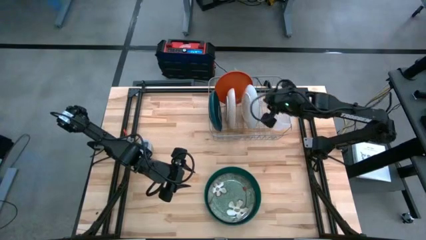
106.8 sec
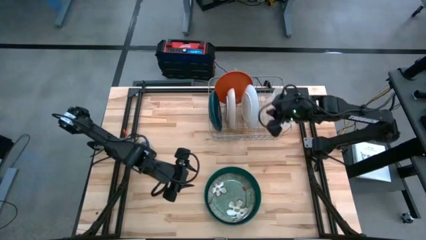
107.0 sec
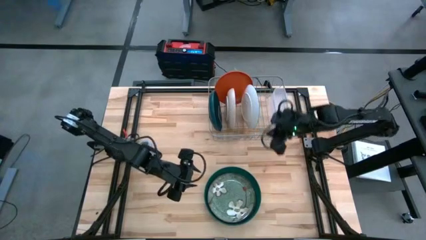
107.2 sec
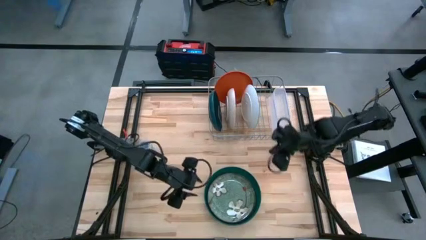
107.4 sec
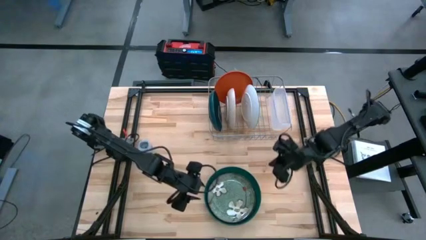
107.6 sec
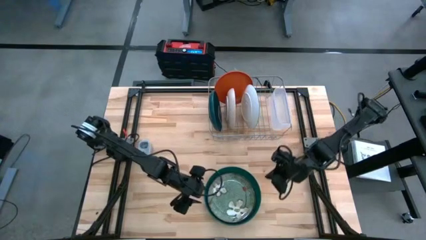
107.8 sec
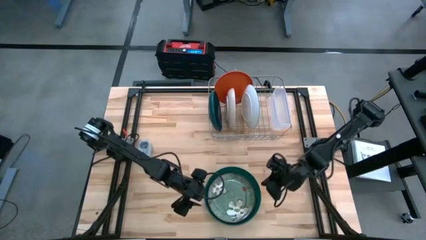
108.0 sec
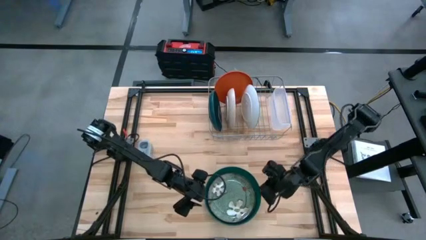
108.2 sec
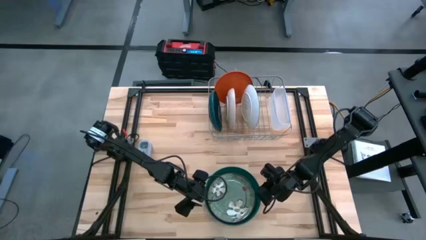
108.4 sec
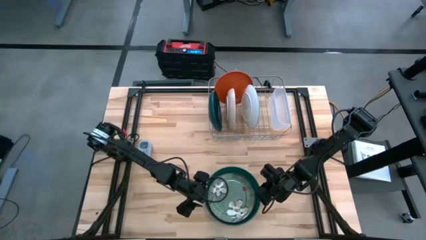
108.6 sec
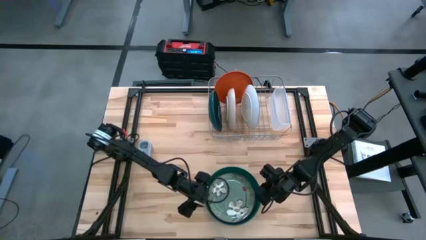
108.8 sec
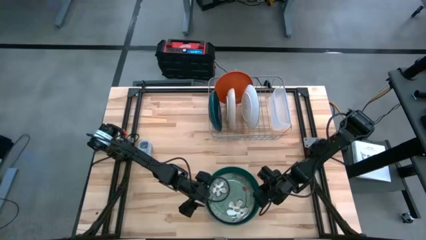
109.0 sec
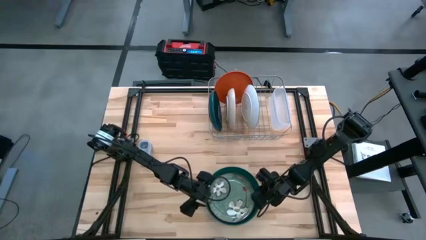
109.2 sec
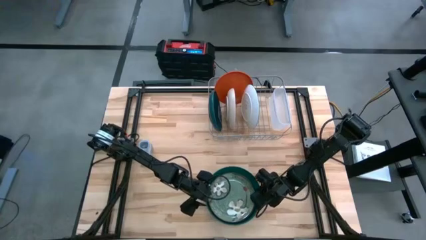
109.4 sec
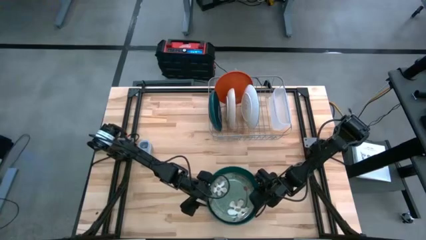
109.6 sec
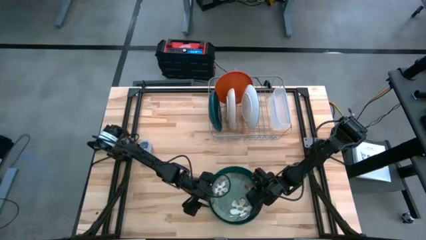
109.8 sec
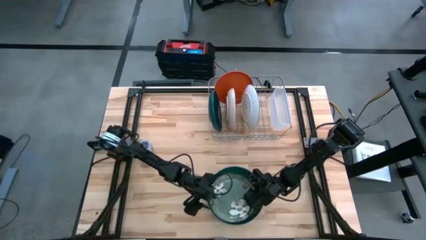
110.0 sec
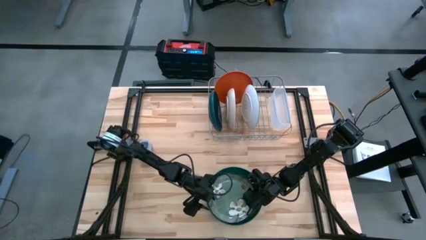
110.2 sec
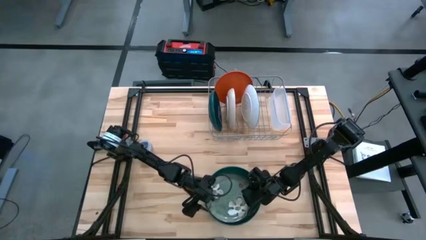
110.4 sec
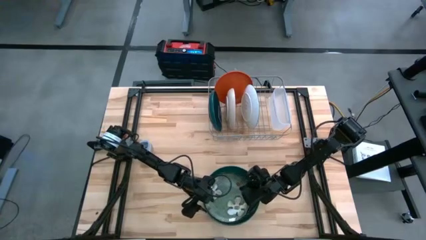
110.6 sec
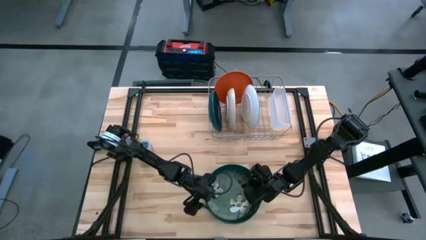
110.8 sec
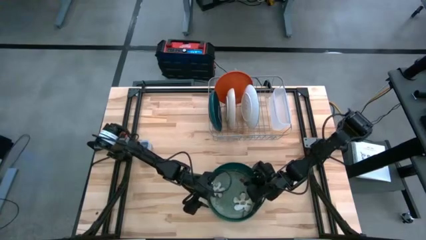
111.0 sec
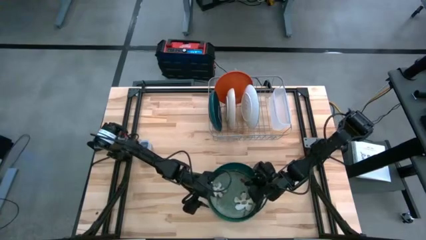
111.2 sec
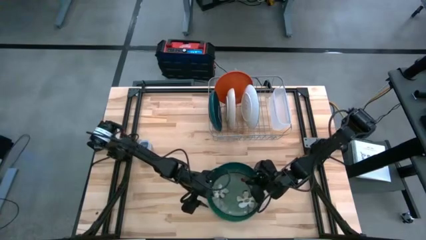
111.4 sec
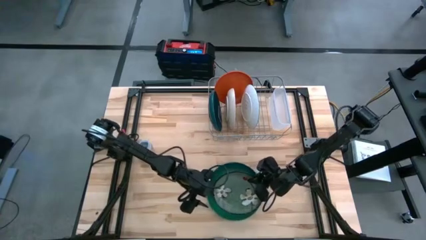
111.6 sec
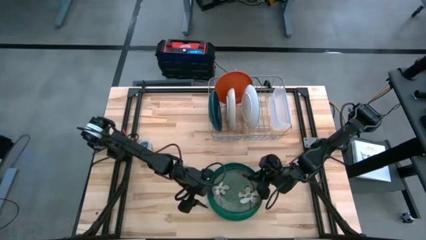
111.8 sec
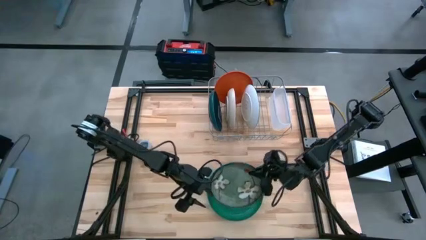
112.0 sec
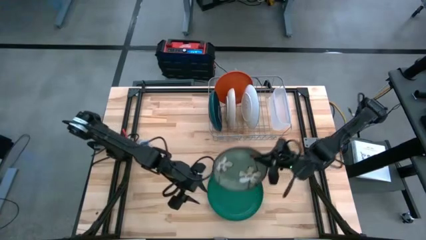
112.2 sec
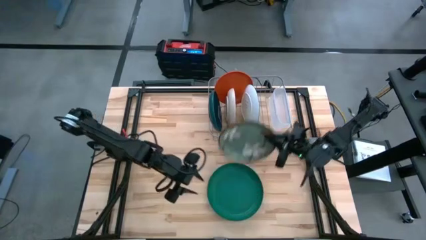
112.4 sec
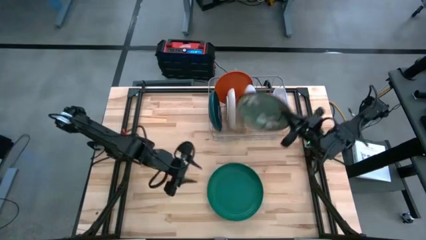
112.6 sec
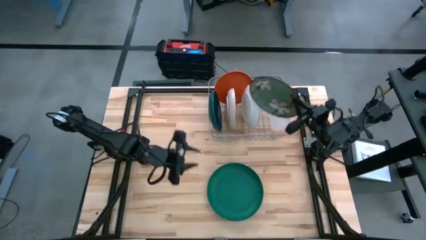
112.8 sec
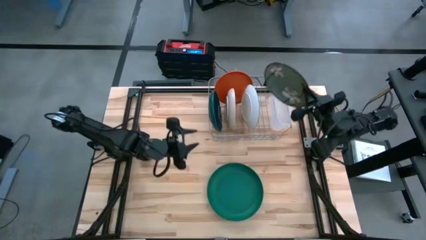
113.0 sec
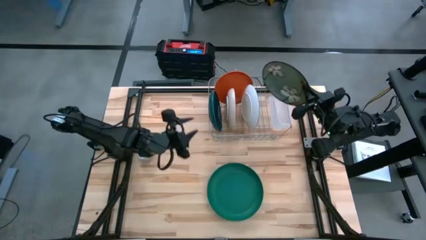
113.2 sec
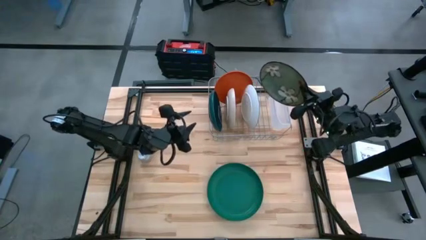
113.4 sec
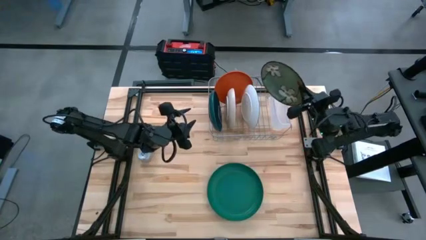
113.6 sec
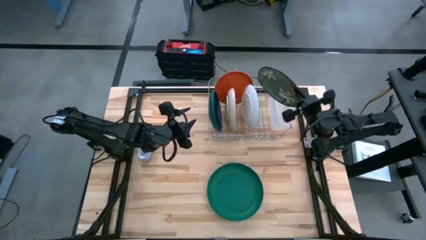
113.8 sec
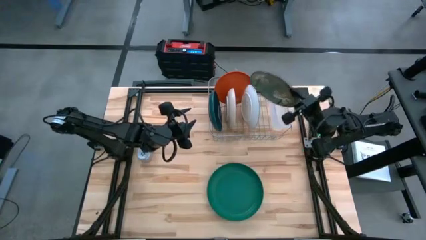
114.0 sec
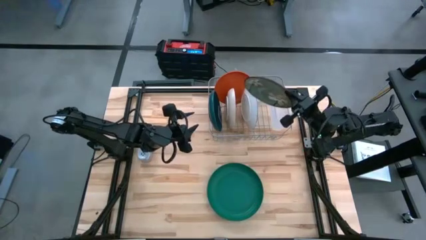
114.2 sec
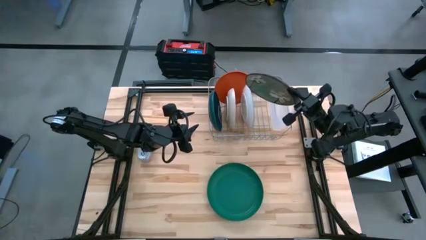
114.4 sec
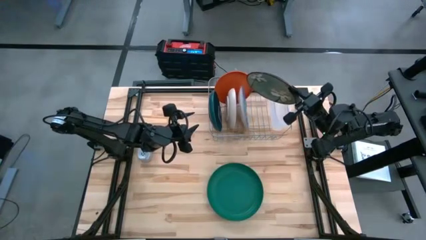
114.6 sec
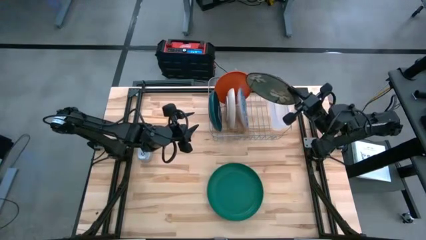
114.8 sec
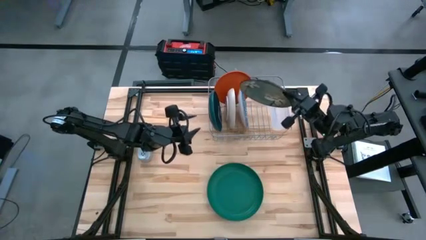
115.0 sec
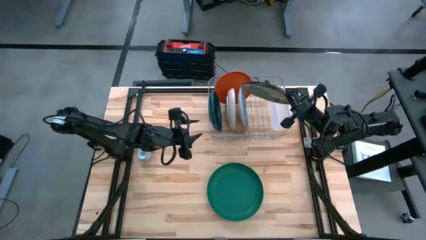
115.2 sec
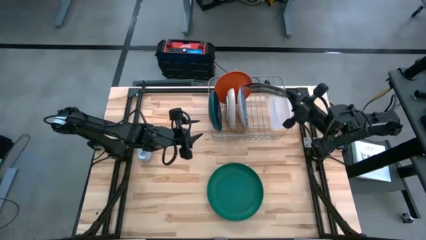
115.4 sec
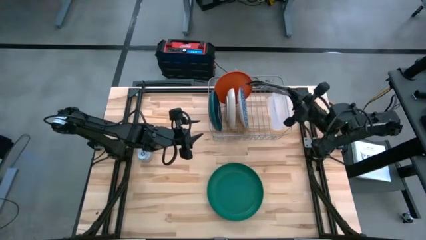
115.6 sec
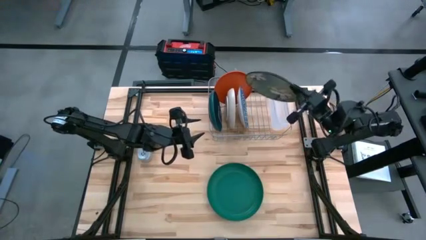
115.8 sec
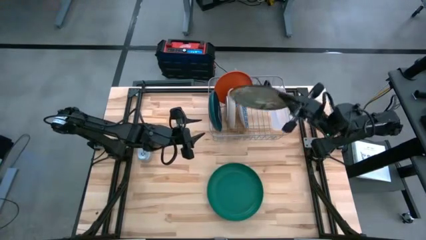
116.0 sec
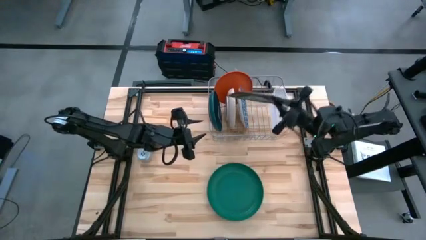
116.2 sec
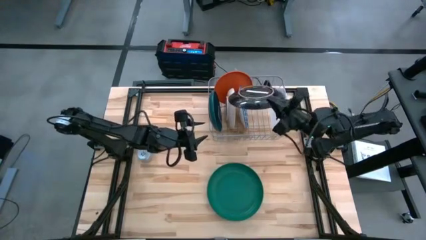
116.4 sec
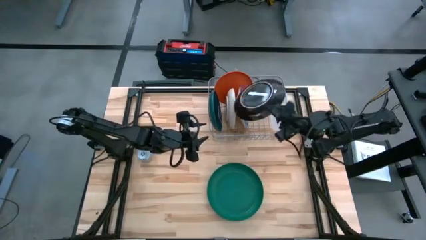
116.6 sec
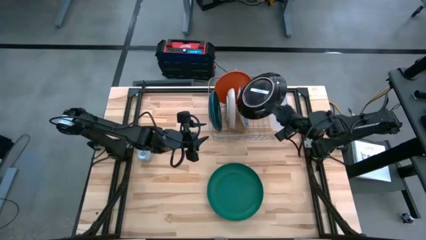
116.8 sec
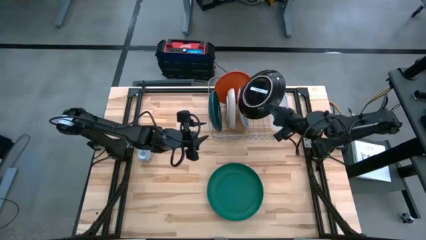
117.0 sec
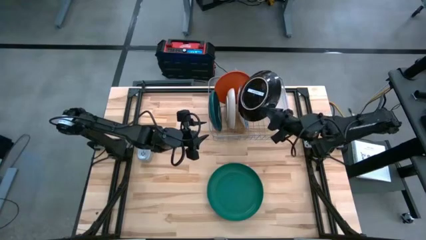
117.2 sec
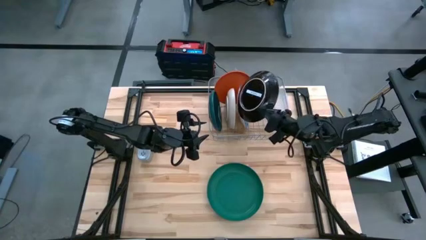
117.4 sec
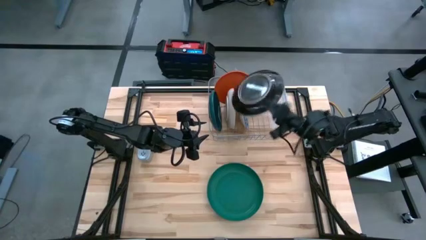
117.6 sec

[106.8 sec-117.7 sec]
Task: Sort dishes
Put the green patterned plate in the dish rack

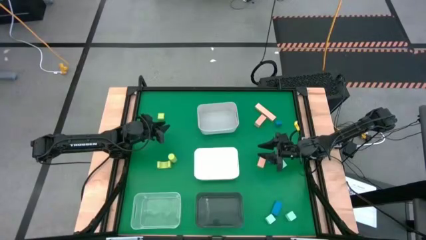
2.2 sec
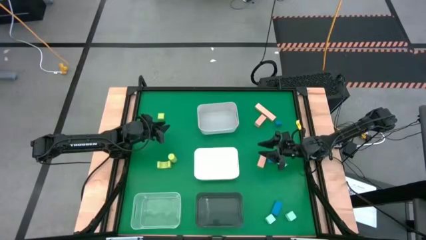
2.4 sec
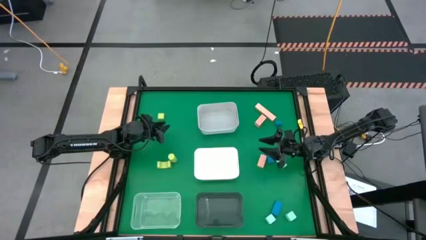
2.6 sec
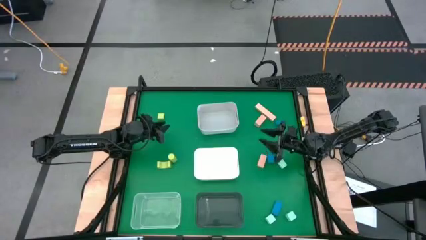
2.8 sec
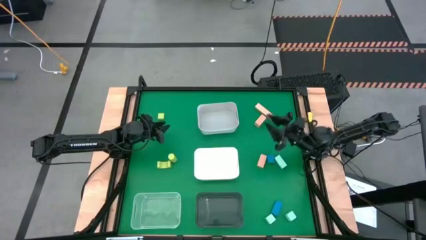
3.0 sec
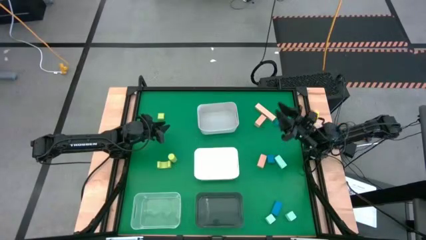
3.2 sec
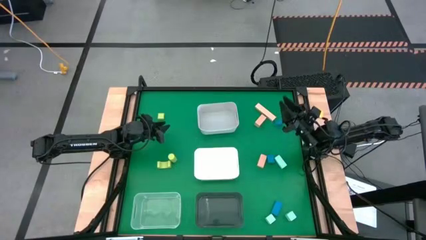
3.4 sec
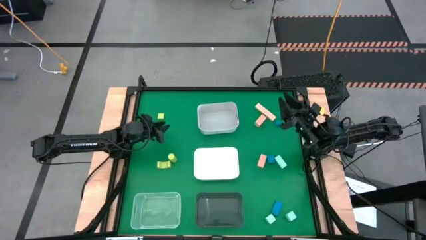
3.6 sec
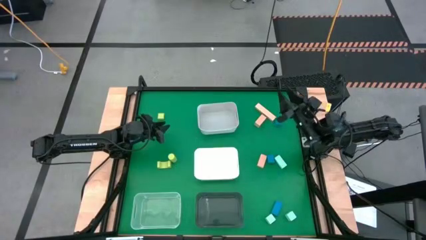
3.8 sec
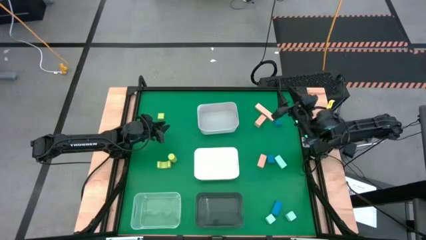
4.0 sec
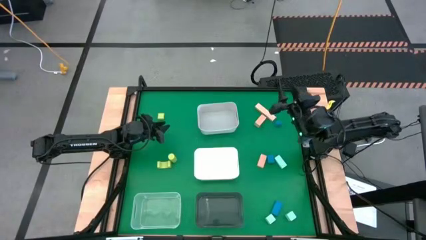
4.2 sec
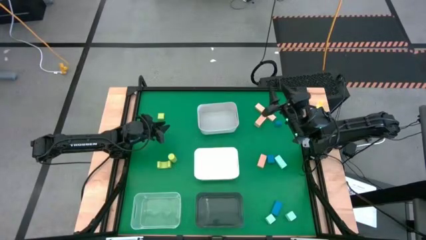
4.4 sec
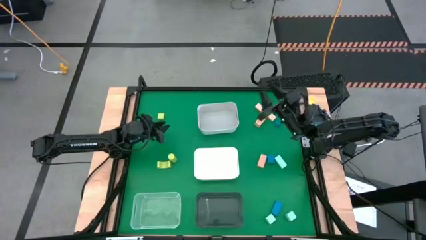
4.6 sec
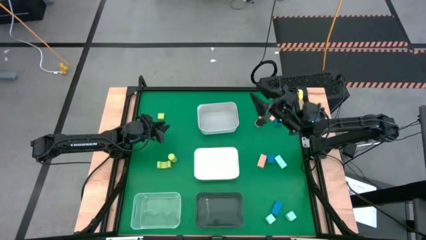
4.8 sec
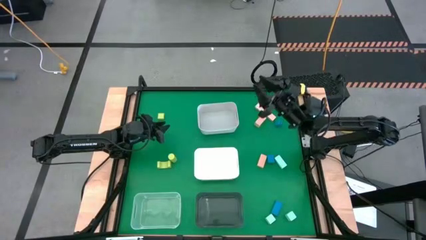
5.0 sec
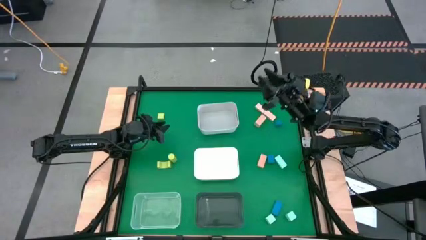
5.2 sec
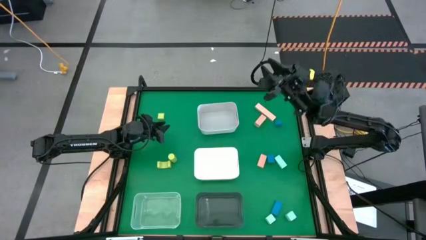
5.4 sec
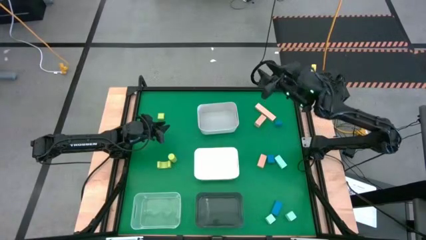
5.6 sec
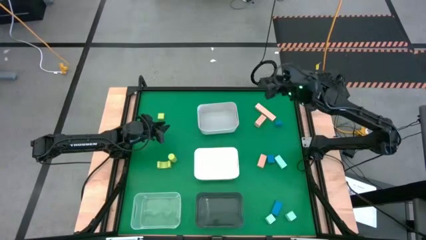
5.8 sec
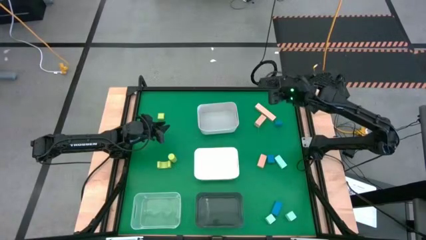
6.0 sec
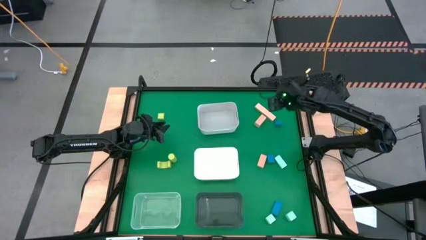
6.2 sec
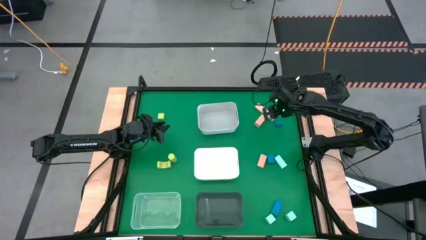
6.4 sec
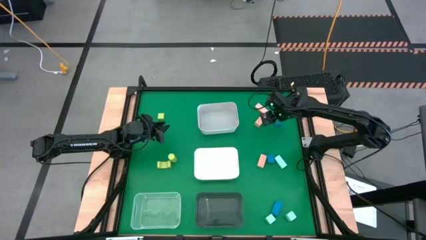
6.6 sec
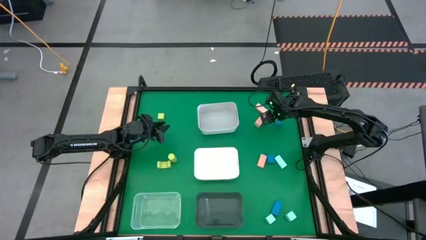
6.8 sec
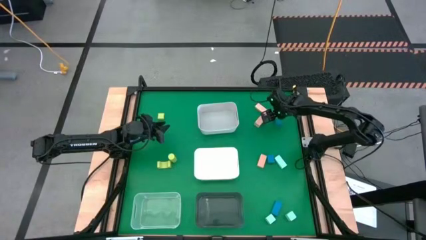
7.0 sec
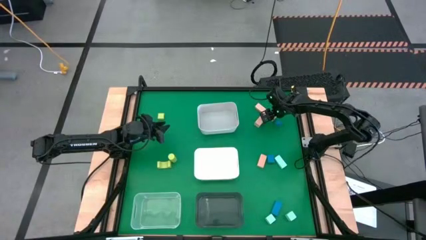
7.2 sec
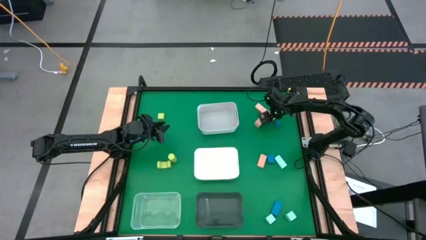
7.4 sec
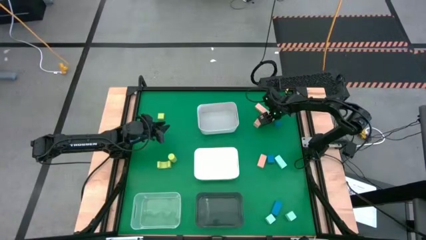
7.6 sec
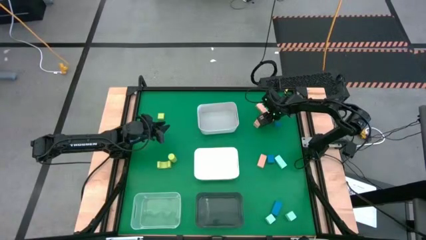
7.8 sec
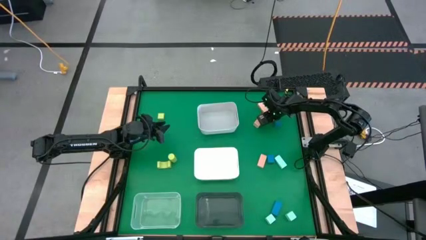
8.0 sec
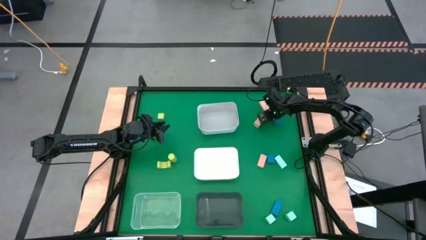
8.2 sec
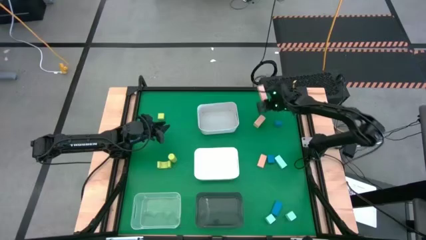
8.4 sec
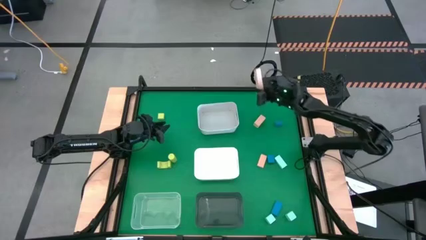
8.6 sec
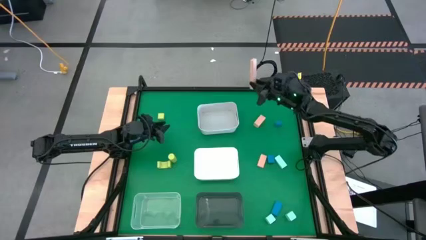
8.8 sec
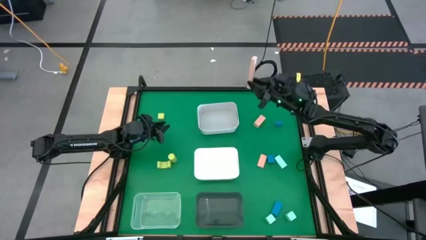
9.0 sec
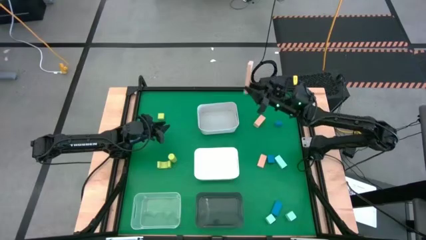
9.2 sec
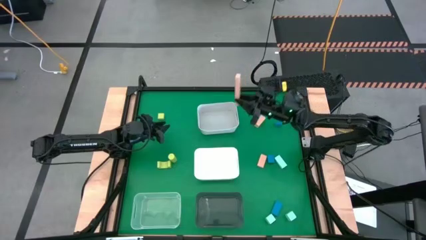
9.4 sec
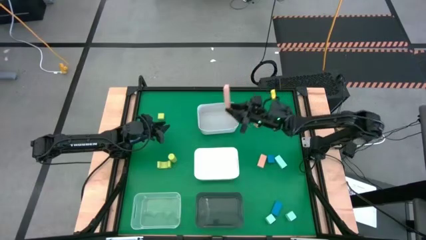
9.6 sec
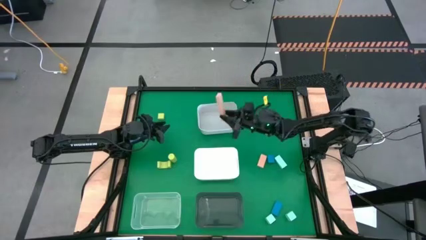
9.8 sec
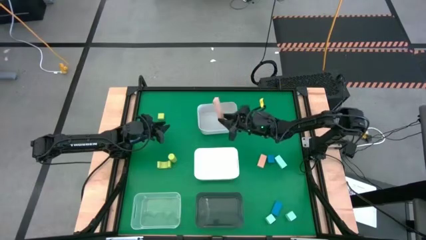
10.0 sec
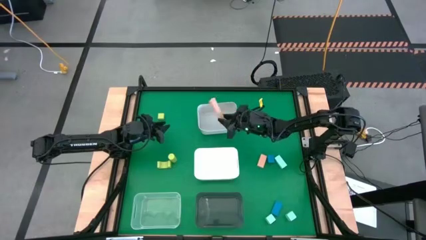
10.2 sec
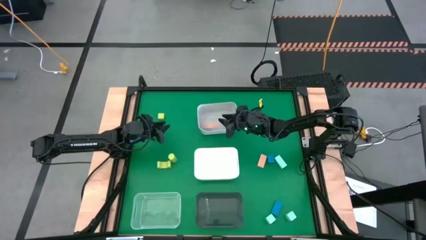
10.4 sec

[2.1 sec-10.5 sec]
Task: Sort & place blocks by color
Put the top brown block into the gray bin
